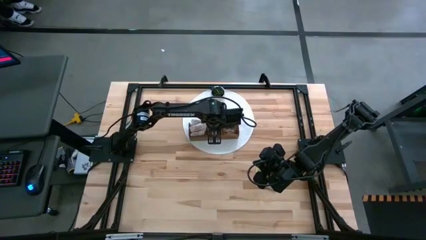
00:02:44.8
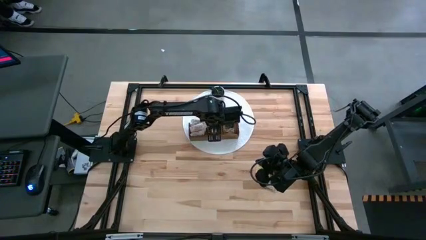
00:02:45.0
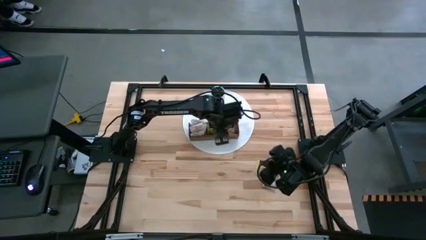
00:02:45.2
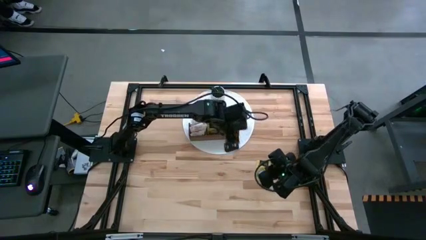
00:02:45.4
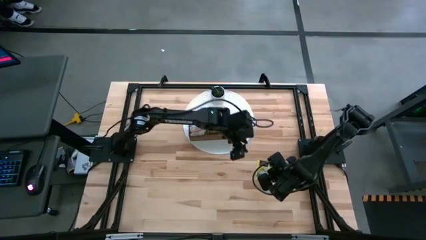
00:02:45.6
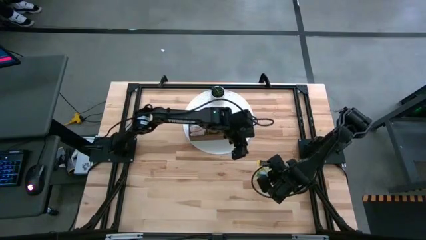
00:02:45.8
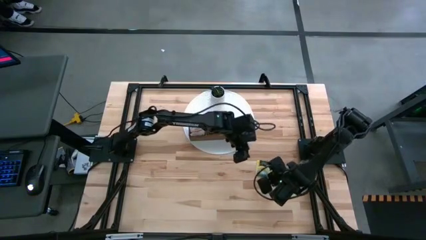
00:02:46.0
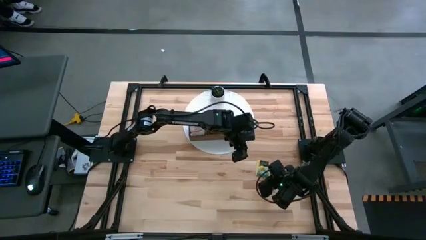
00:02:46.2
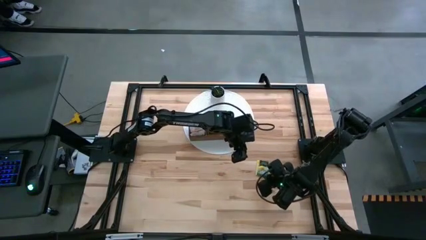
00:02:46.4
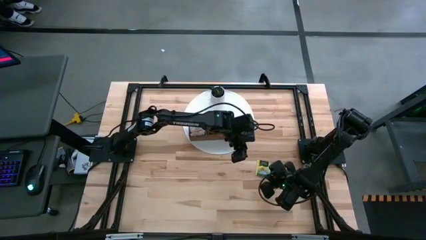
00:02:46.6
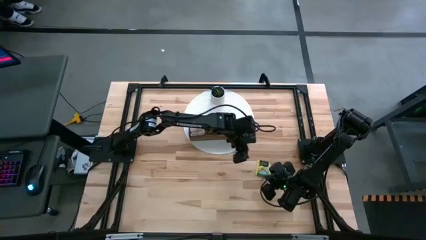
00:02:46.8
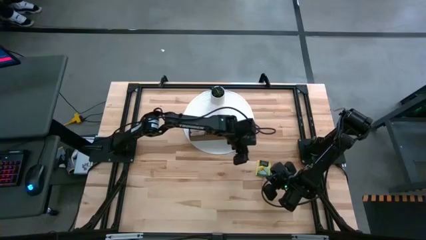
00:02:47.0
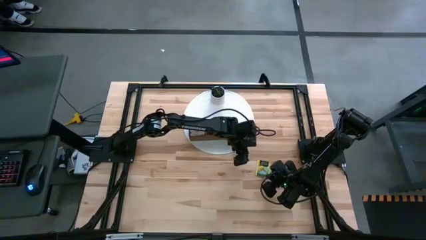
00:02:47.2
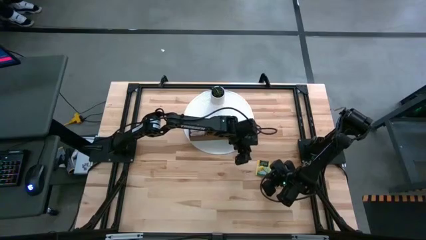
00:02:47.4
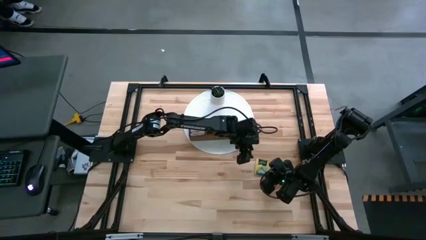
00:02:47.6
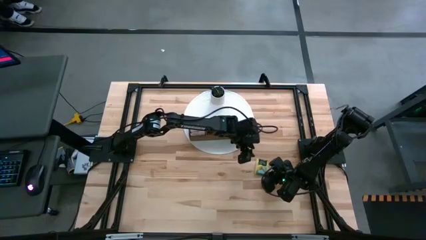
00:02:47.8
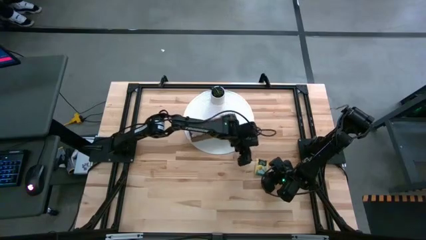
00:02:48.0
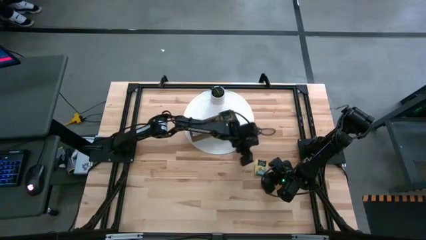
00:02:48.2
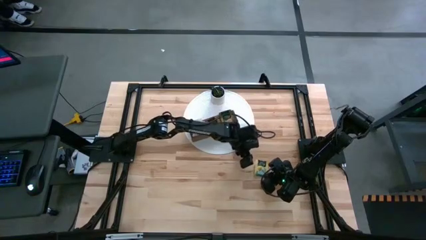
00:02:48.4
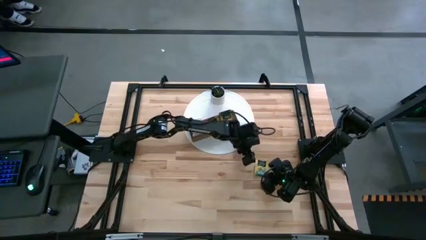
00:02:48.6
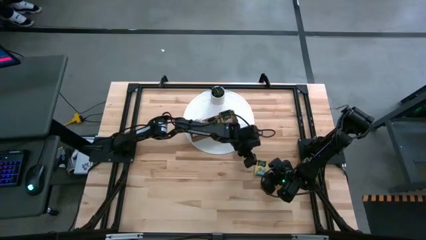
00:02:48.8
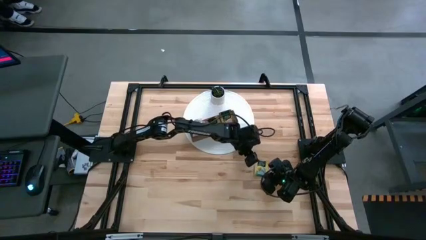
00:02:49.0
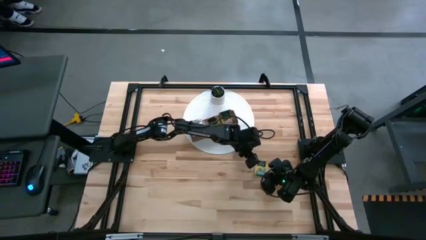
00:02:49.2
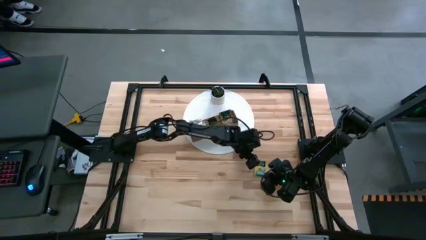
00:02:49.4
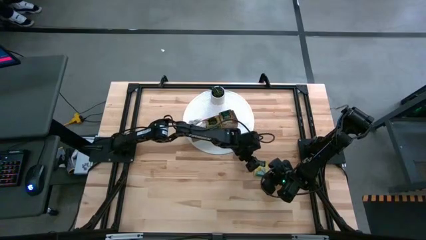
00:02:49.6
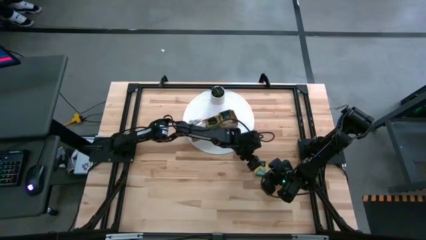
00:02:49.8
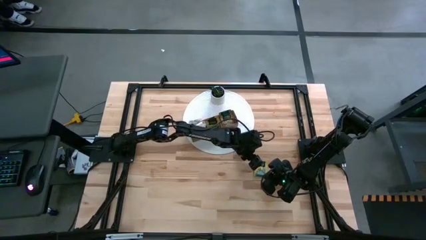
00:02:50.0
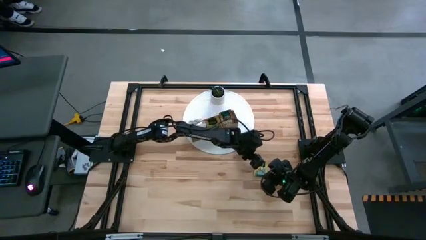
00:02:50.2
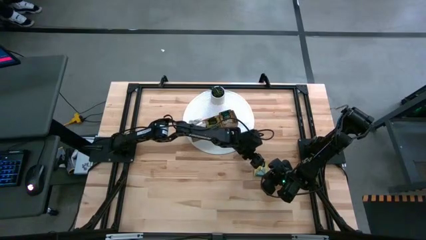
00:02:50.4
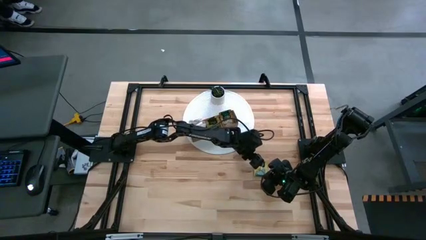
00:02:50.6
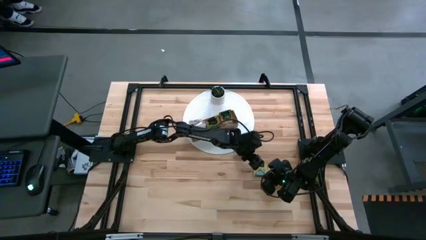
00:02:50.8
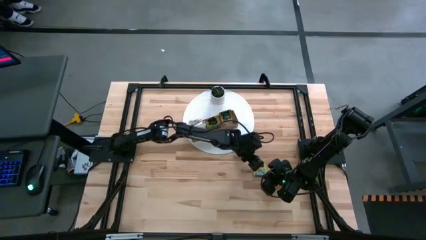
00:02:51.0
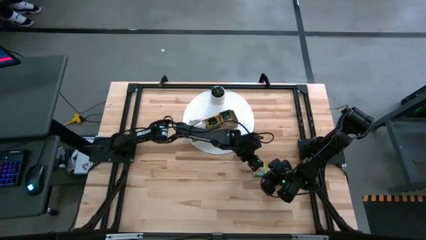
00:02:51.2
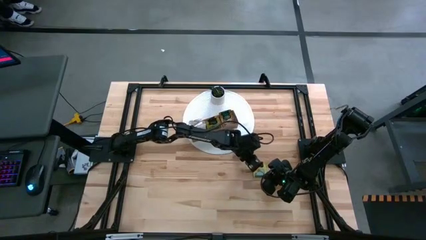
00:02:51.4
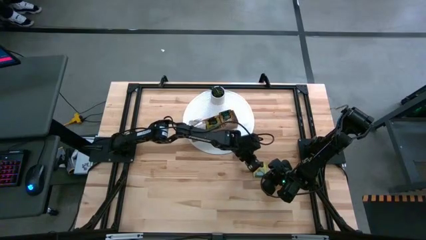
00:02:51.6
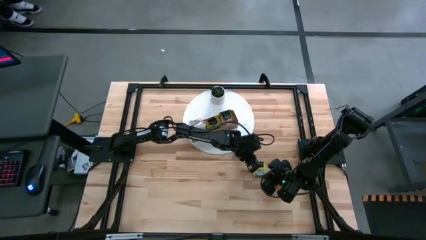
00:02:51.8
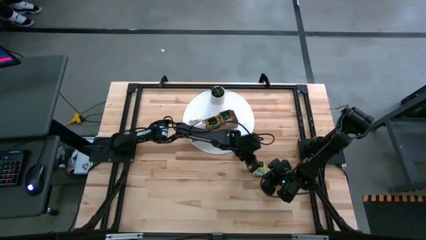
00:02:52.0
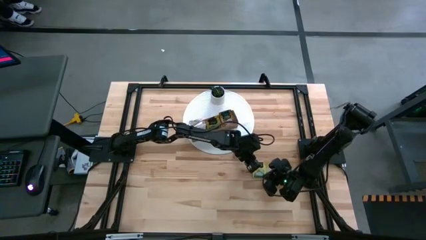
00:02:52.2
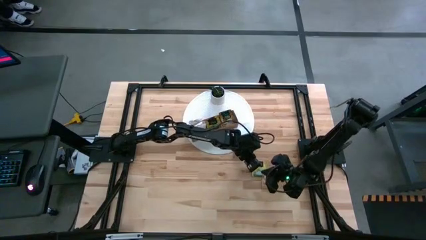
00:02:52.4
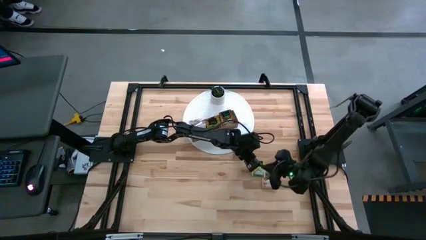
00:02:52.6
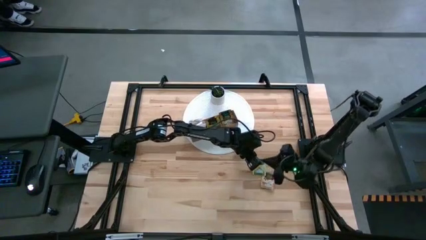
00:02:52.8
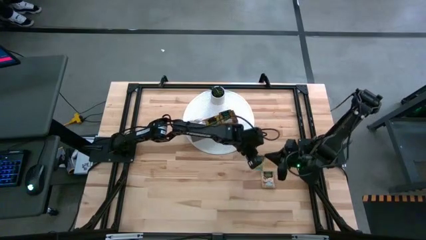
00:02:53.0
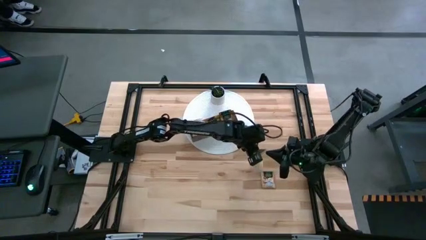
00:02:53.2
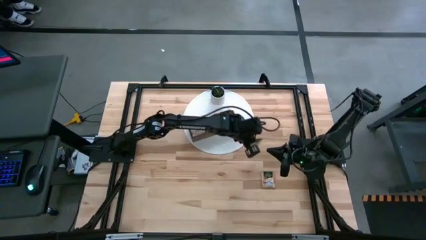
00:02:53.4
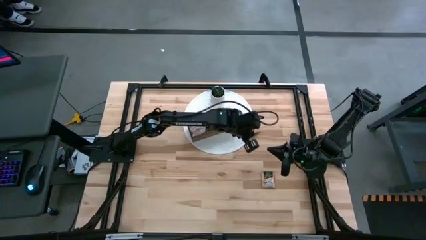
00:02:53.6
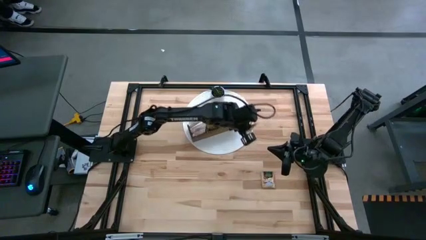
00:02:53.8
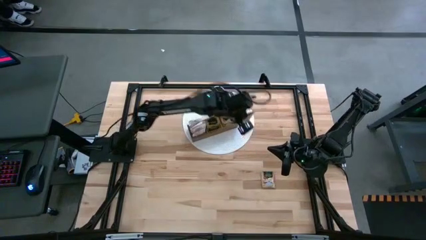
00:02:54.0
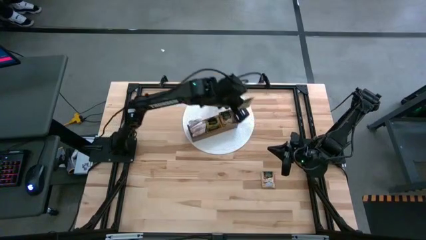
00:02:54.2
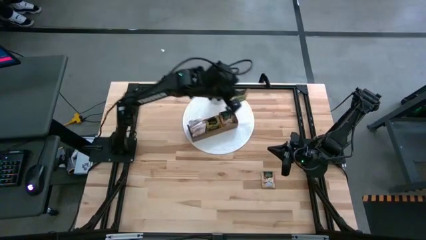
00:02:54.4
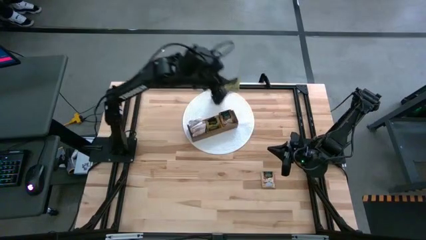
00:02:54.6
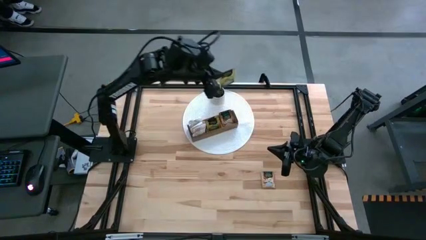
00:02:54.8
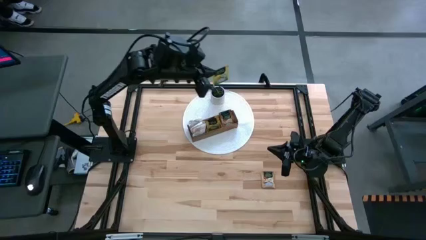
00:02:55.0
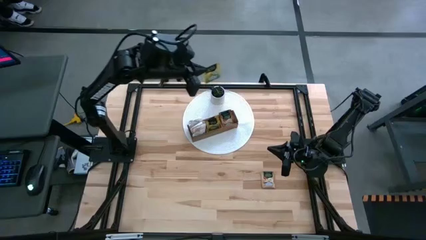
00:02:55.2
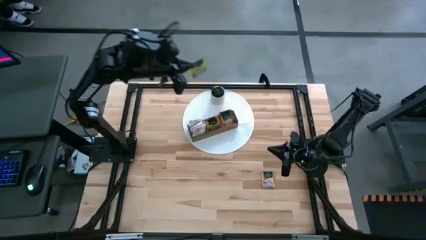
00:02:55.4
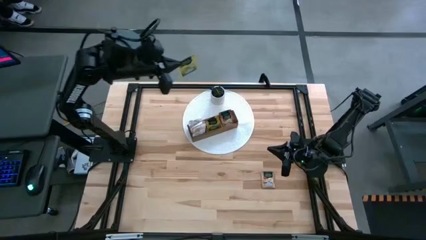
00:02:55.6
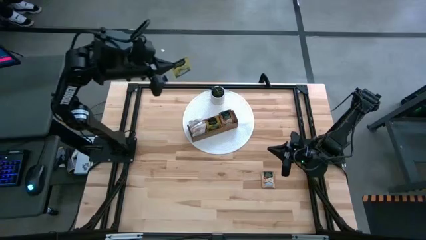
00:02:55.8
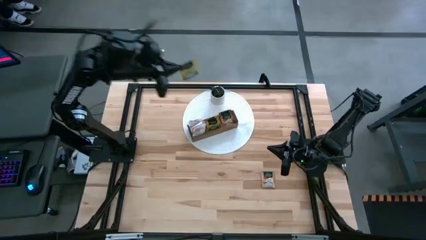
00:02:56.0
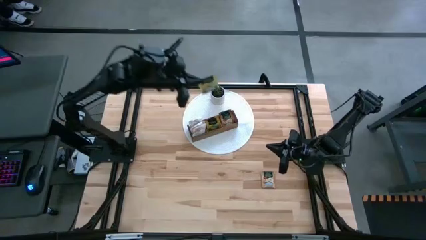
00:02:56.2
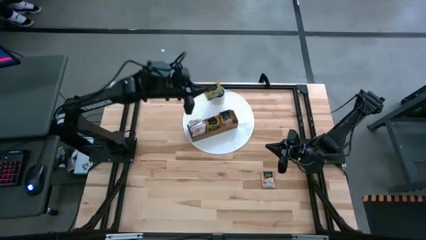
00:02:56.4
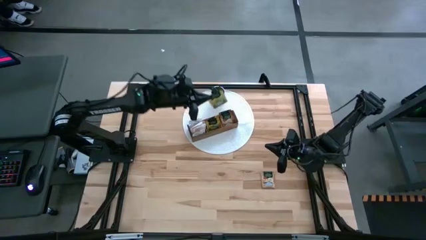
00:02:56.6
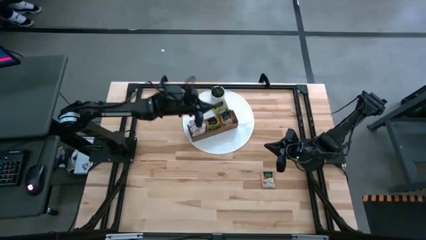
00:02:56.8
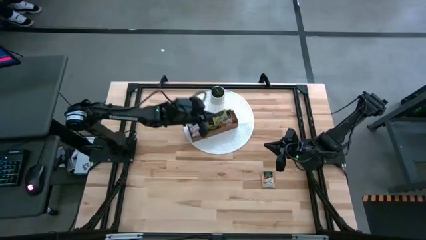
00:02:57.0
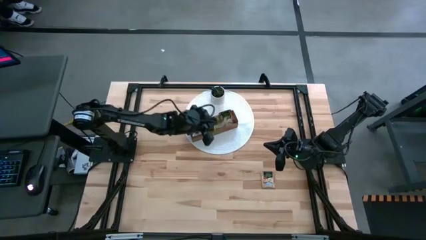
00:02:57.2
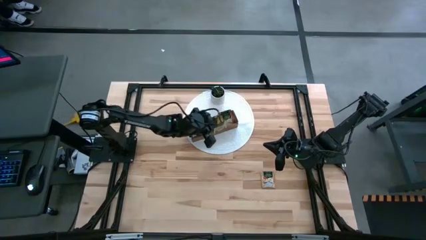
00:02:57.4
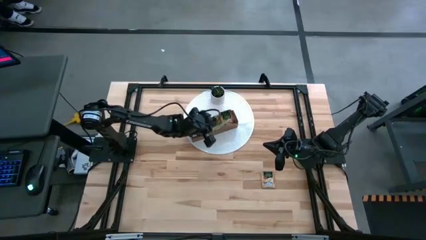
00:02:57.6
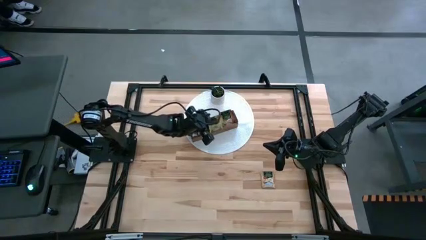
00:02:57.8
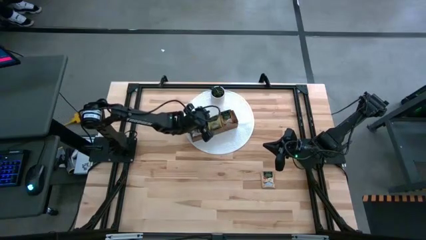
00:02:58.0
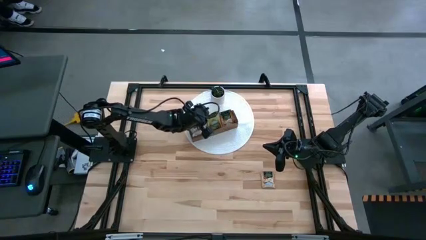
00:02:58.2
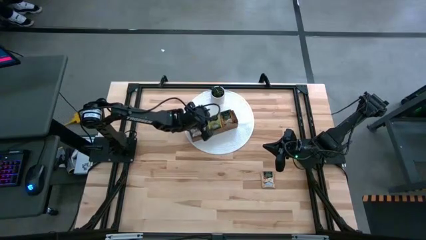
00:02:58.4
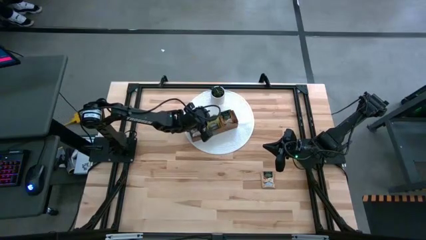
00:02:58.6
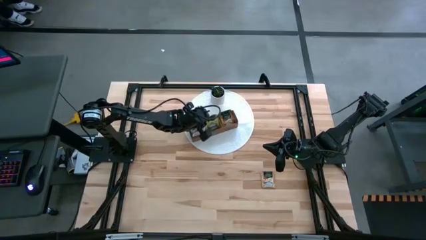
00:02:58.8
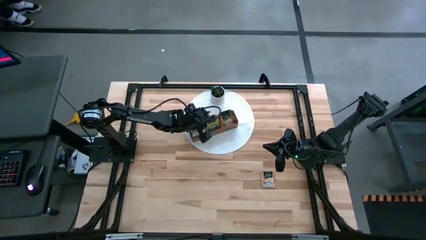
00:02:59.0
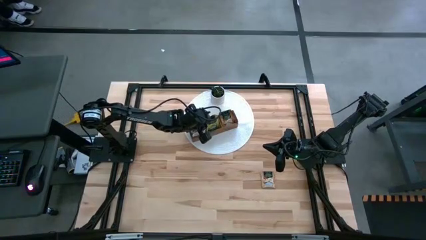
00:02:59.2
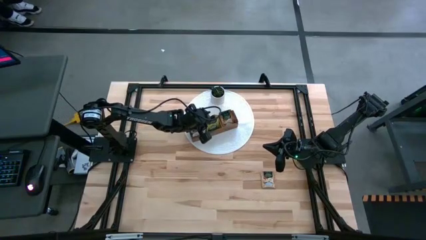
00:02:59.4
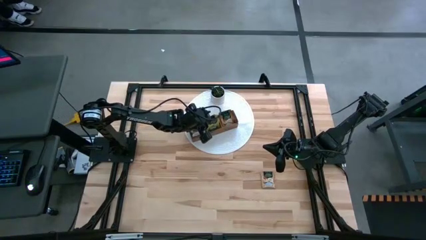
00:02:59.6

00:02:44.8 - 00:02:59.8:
Task: Pick & Place Tea
Put the yellow tea bag into the middle section of the wooden organizer

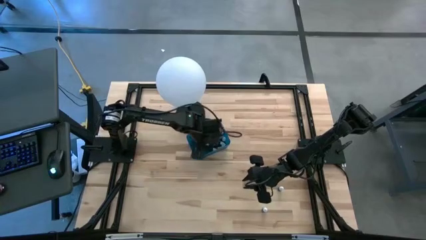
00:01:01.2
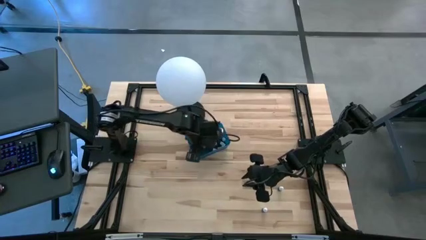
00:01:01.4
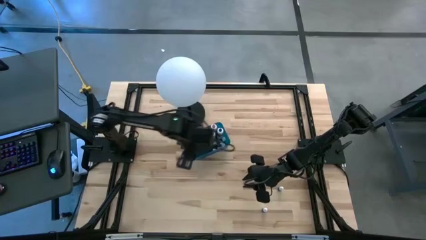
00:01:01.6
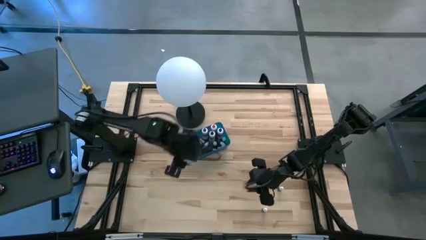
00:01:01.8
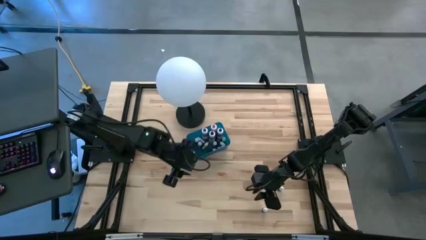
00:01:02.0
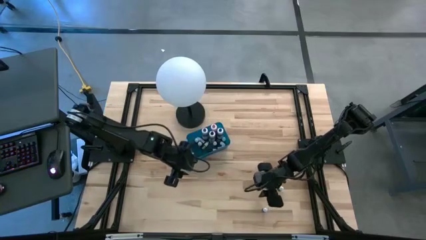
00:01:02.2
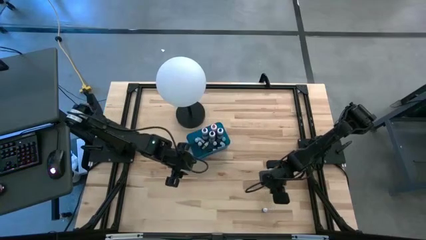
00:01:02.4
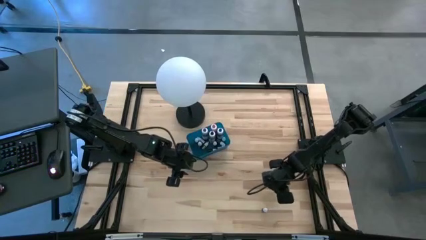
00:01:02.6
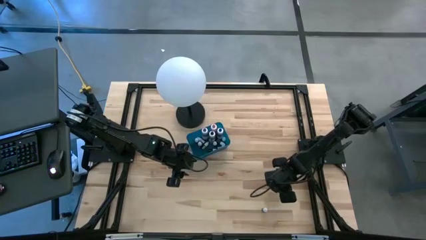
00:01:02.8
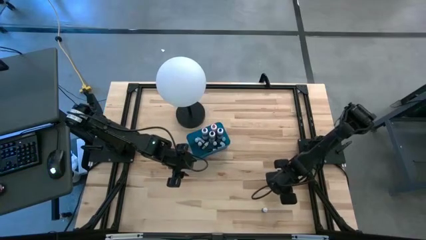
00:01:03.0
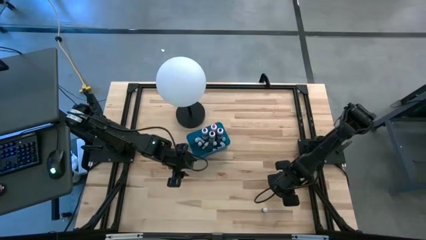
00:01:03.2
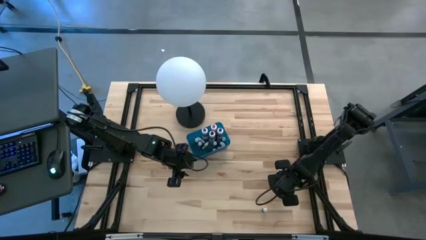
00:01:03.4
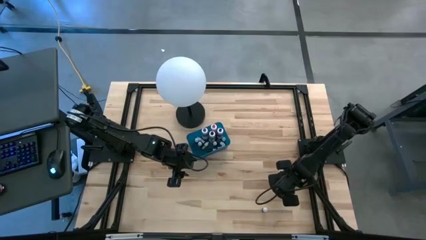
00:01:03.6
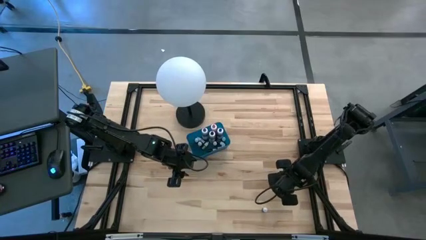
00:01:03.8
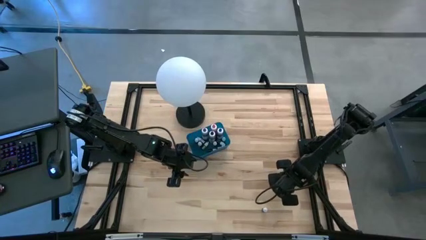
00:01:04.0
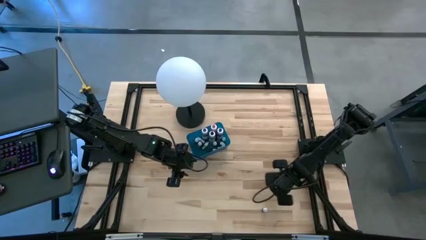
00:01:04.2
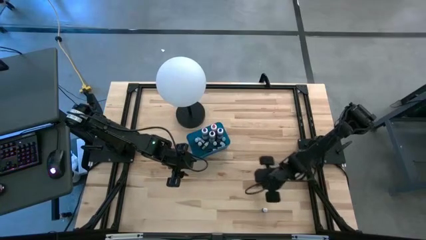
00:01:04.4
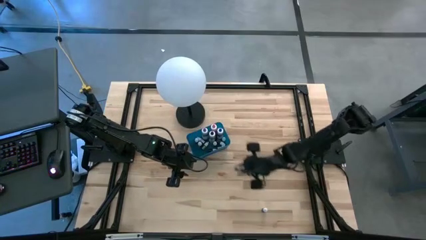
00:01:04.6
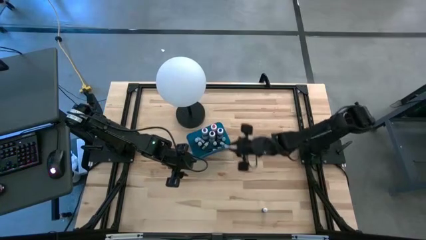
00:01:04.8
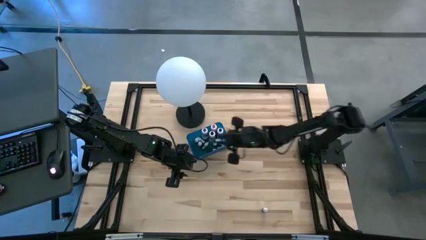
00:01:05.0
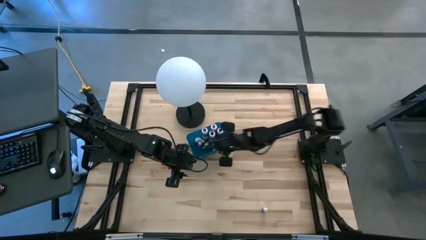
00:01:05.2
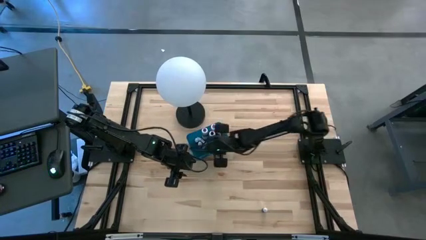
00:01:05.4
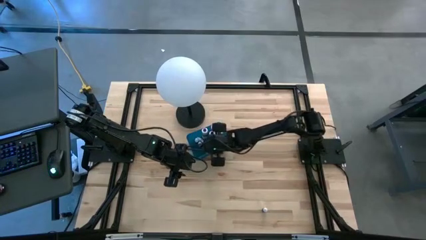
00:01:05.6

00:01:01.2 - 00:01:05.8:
Task: Pick & Place food coloring
Put the small black food coloring bottle into the blue container
